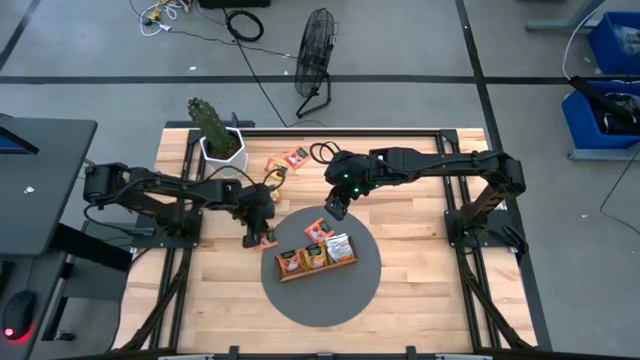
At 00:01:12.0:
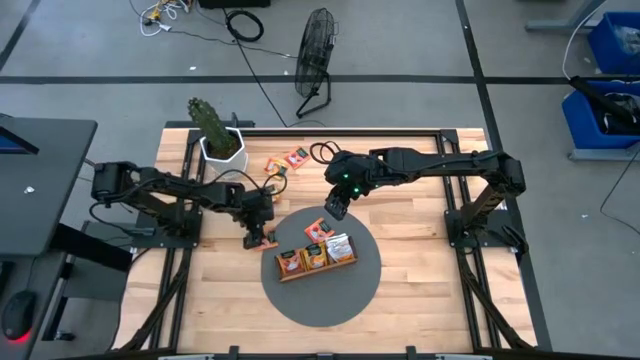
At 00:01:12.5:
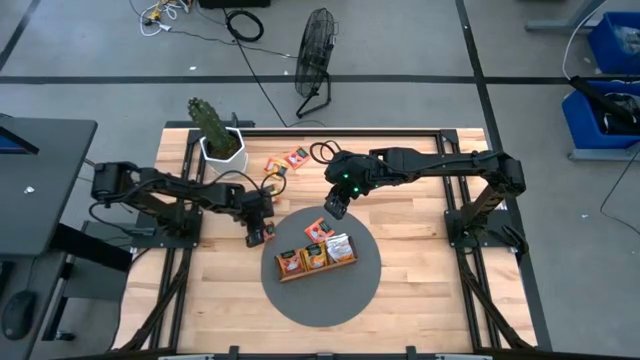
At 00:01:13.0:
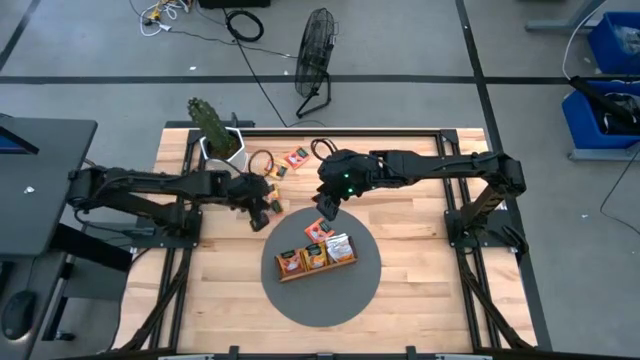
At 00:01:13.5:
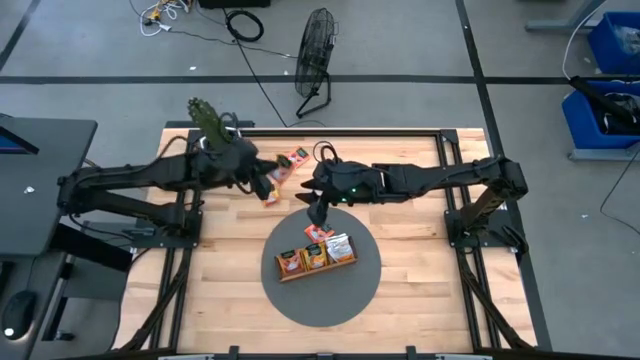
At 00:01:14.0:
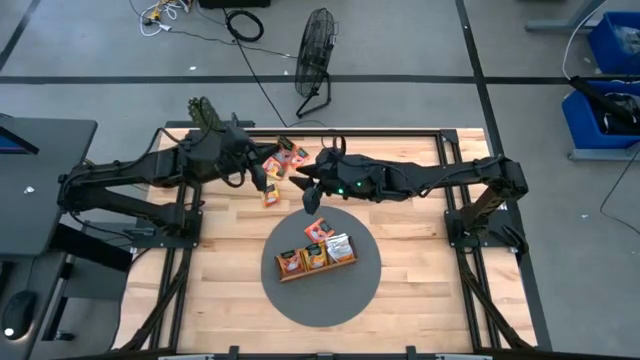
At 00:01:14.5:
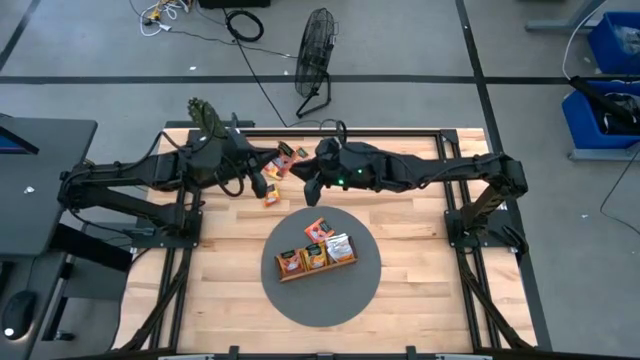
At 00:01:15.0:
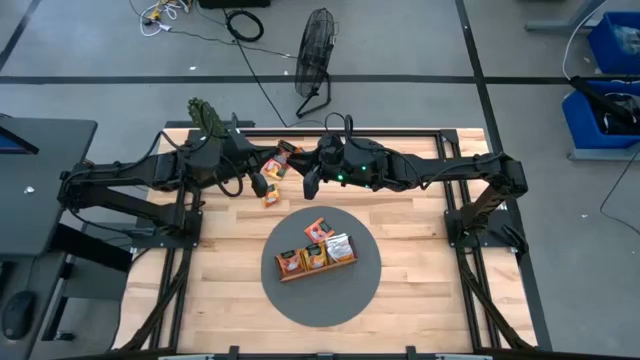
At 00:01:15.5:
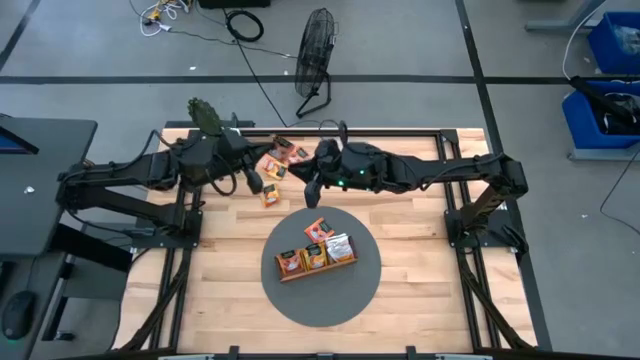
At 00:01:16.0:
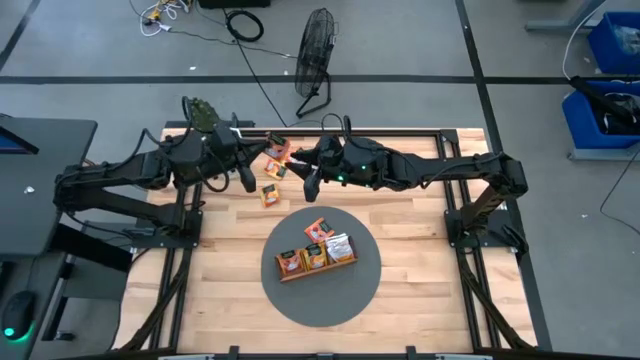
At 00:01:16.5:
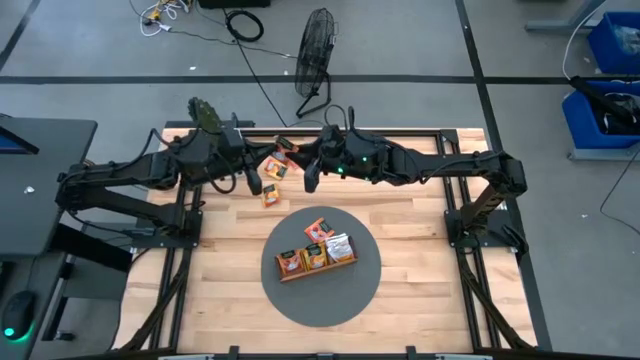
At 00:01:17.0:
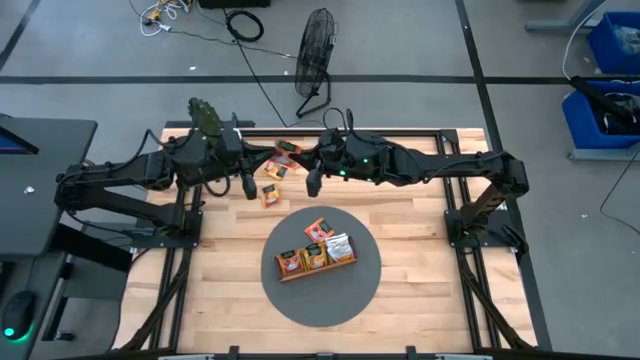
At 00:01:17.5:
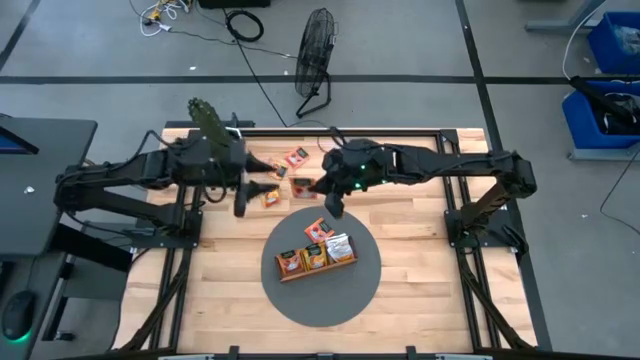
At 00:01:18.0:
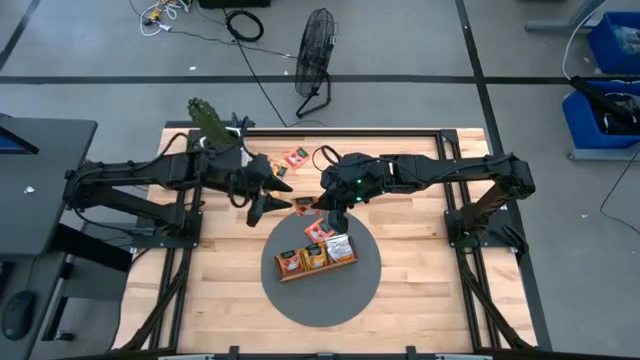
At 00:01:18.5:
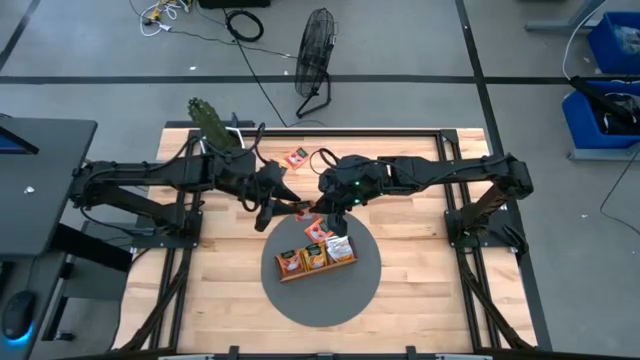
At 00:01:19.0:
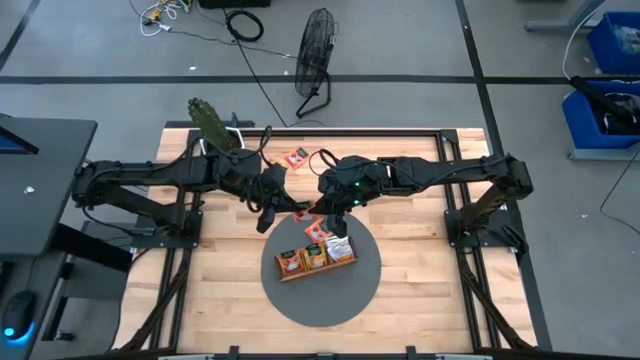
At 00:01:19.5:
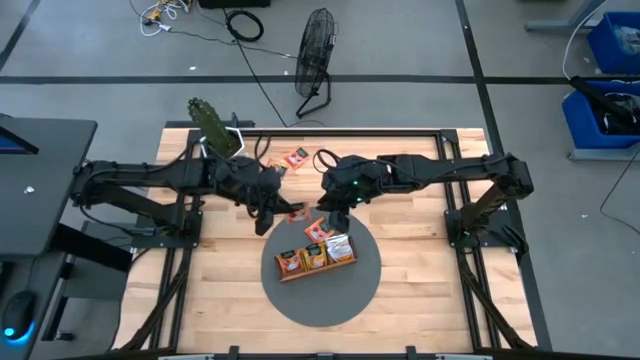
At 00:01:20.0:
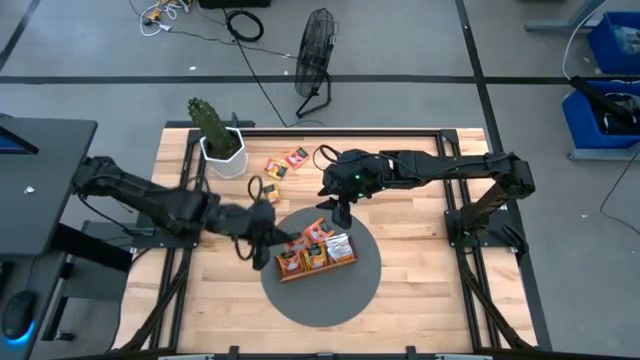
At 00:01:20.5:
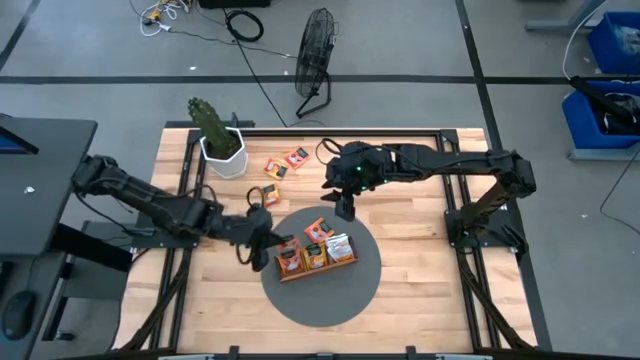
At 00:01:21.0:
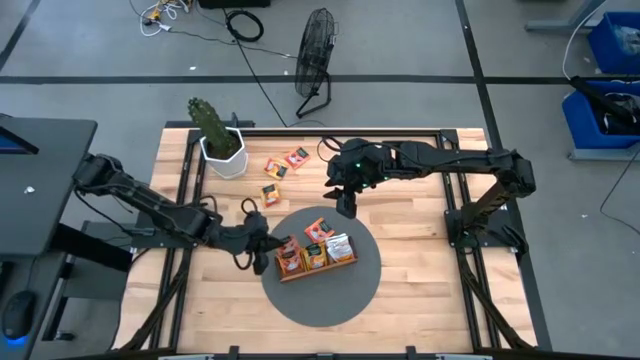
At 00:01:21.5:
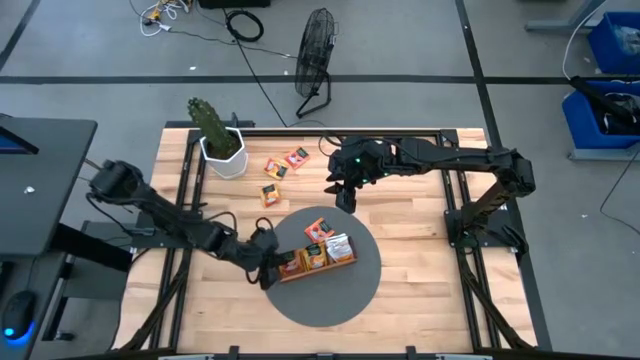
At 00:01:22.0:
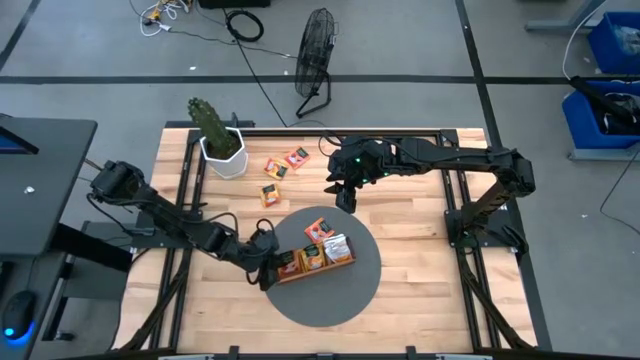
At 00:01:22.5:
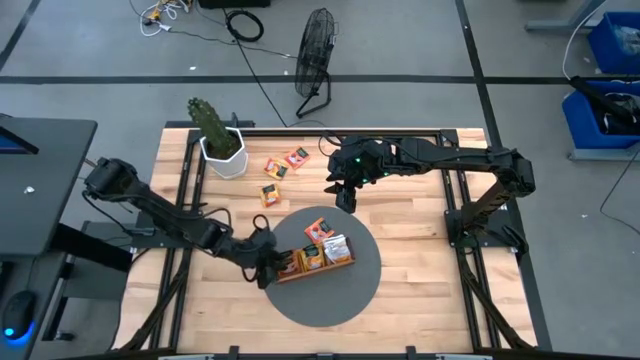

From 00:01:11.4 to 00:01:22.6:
Task: Pick & Place Tea
Put the bottom left orange tea bag into the left section of the wooden organizer

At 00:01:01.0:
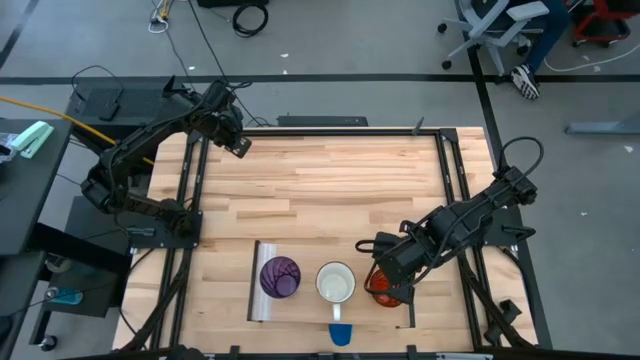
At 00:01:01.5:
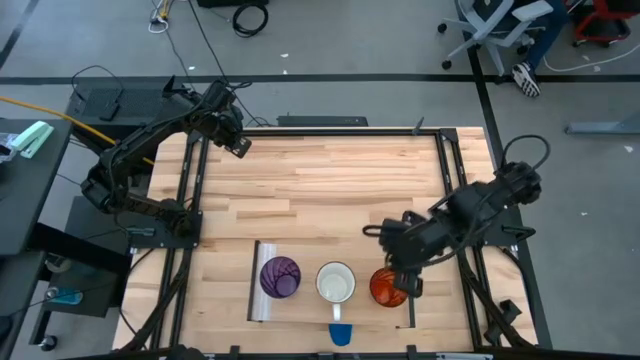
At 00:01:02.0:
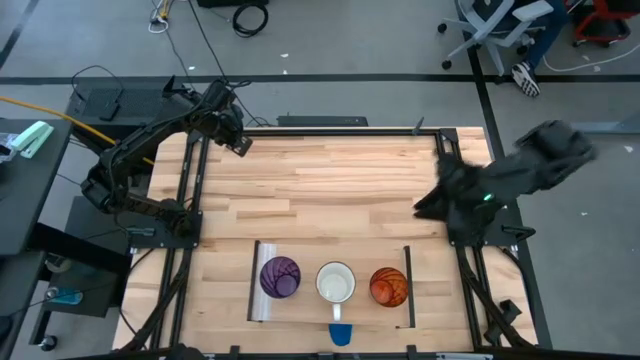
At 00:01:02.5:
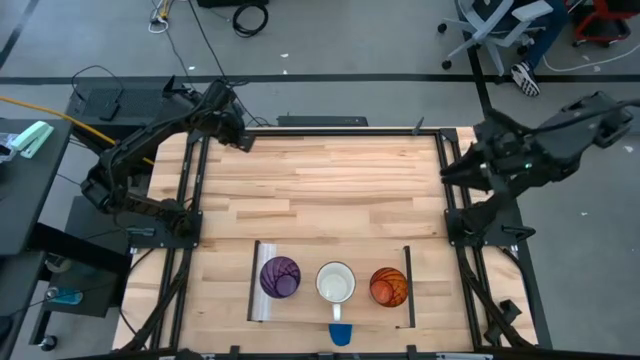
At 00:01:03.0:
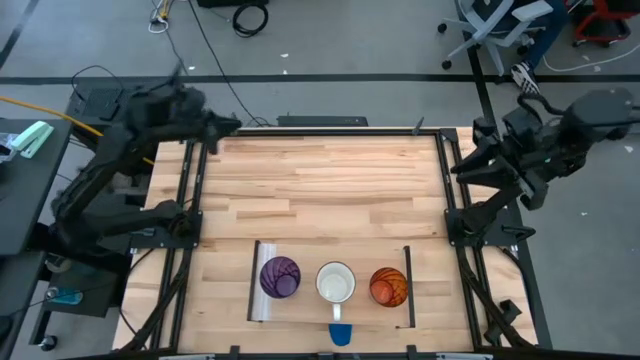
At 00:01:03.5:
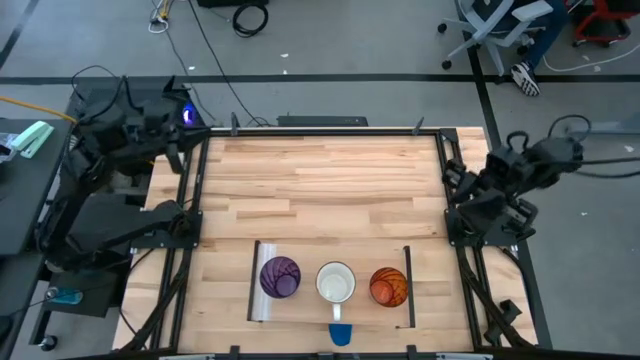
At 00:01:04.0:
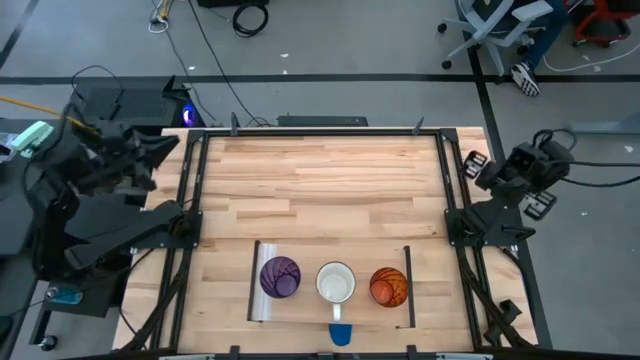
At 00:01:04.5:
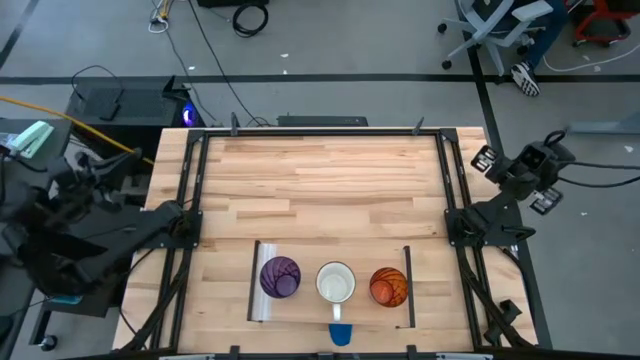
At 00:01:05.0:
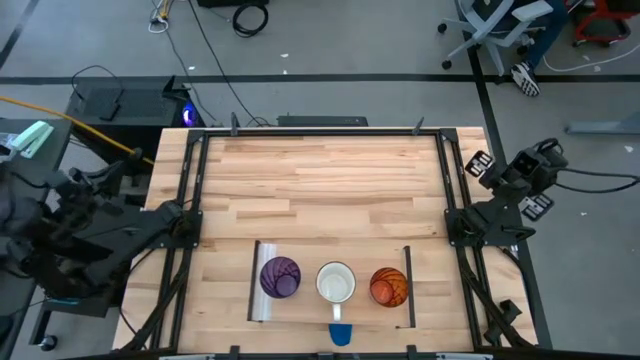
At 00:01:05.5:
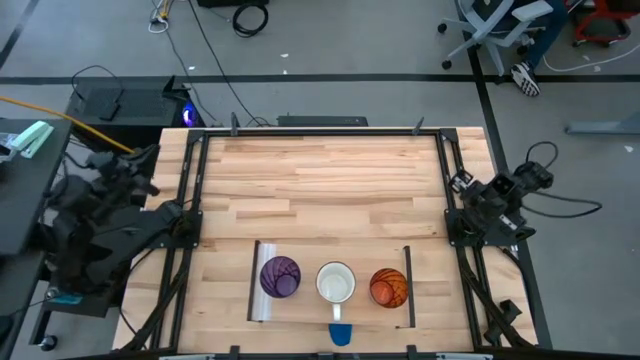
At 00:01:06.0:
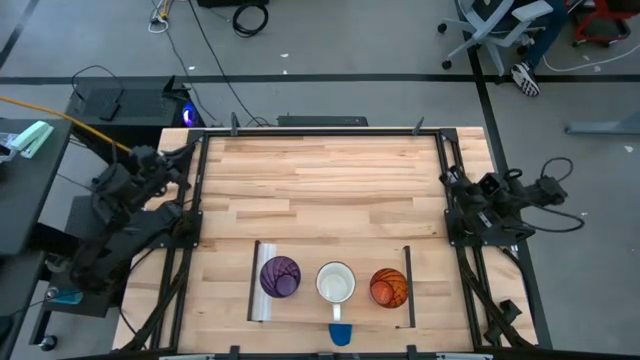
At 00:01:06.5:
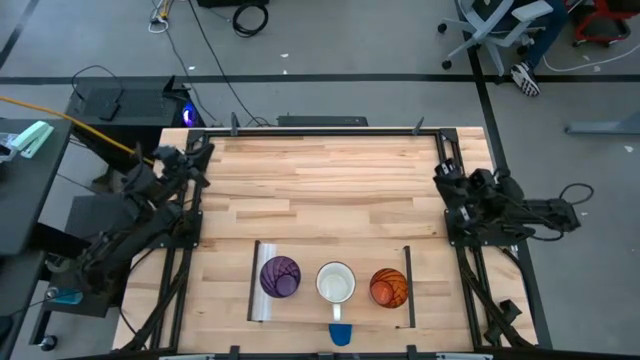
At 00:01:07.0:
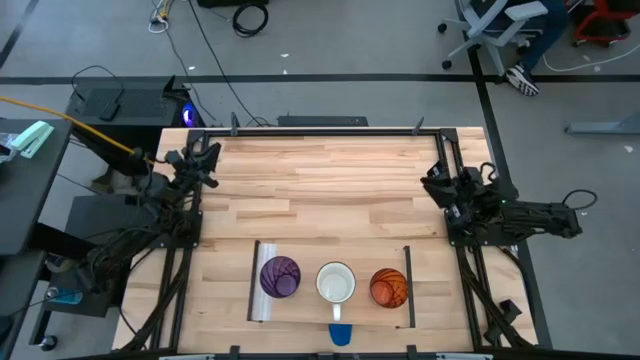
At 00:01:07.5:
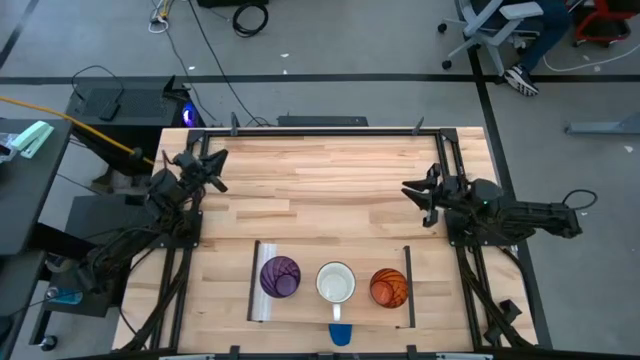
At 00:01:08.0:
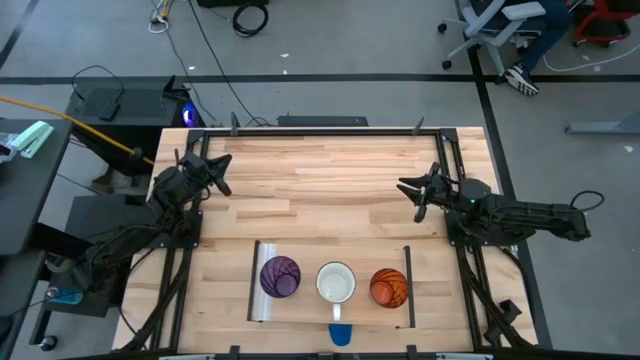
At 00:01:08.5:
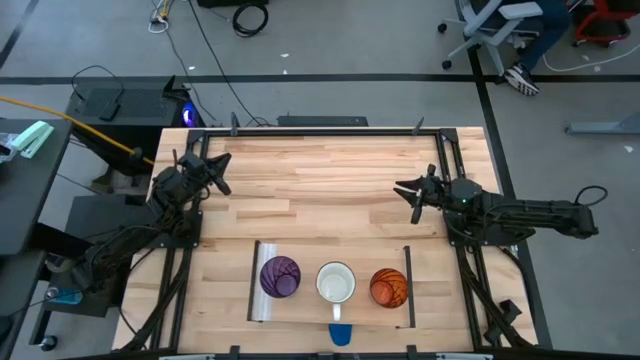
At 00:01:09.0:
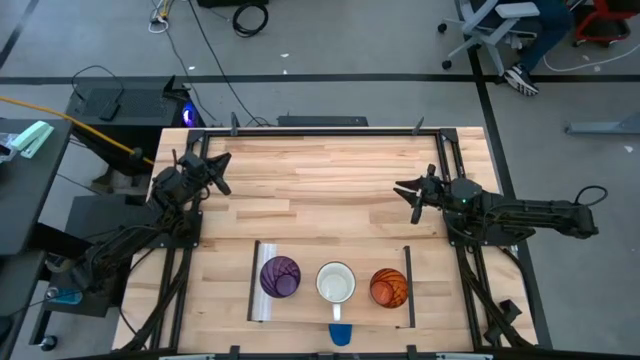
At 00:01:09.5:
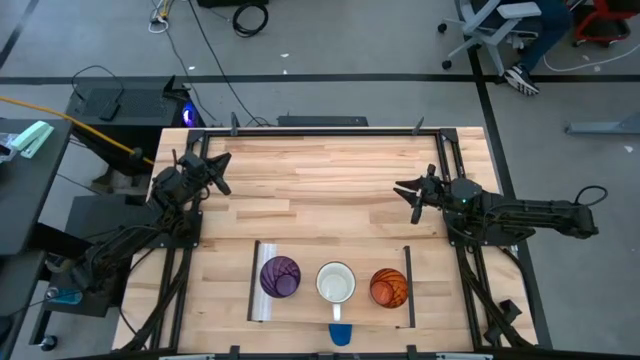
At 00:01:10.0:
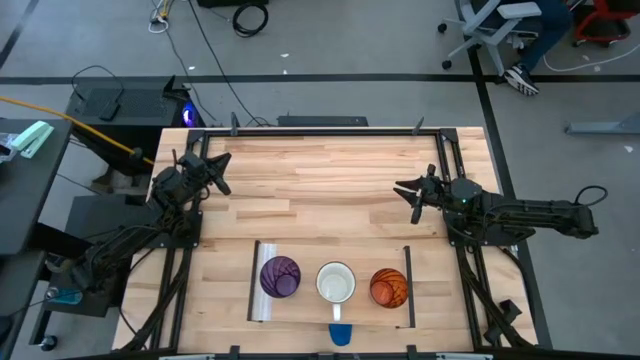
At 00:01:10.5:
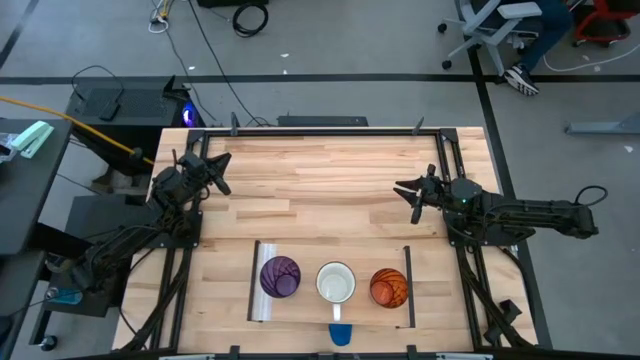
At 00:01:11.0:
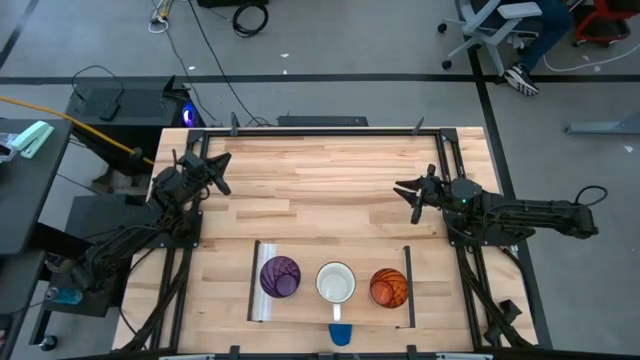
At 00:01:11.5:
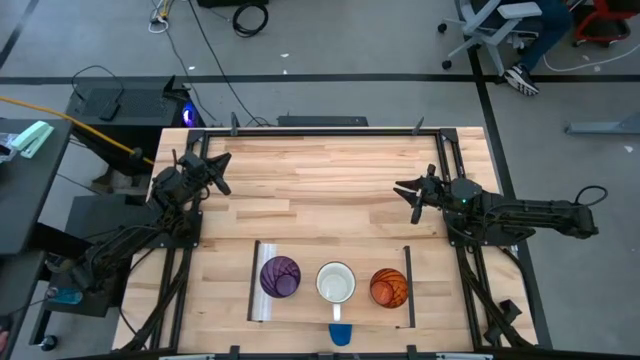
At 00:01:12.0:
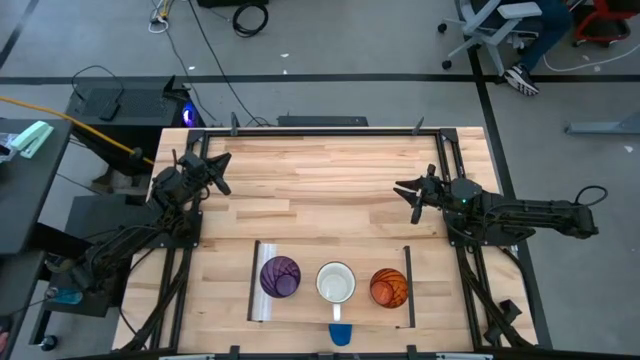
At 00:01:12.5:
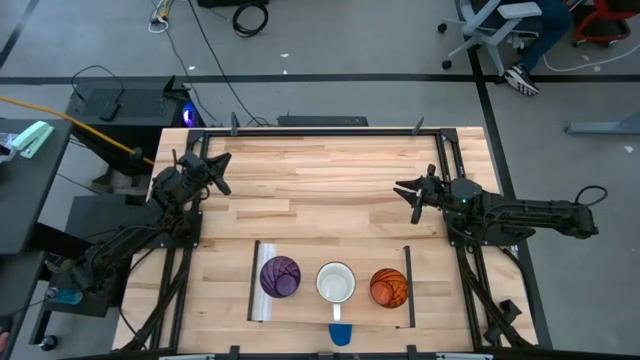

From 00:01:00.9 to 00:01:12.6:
Task: Stack small to large cups/mugs on shelf
Return to Home Position
